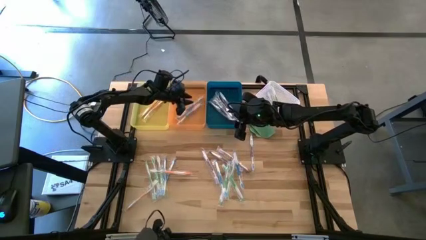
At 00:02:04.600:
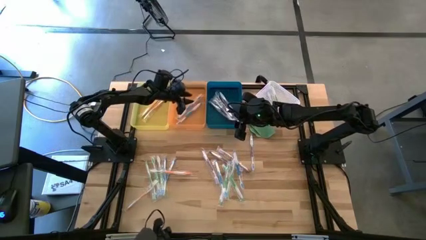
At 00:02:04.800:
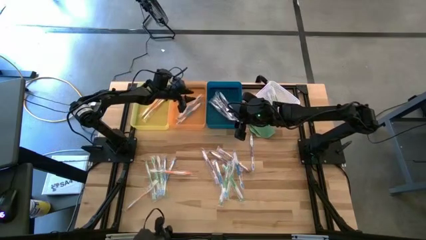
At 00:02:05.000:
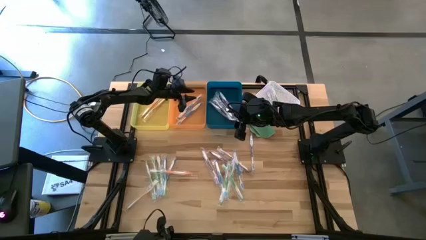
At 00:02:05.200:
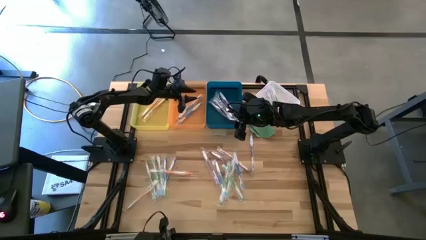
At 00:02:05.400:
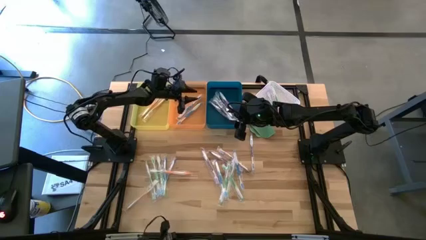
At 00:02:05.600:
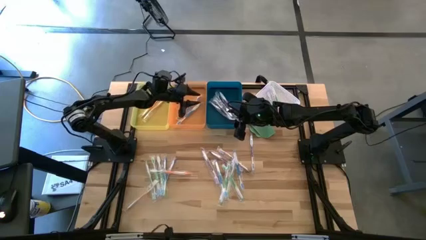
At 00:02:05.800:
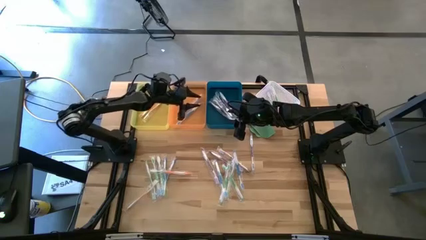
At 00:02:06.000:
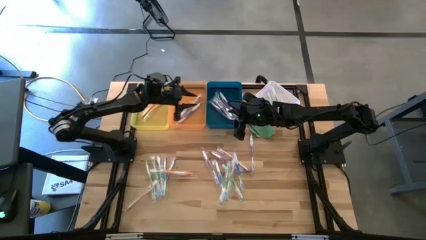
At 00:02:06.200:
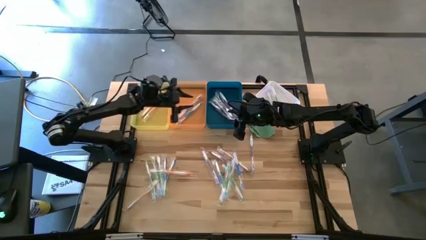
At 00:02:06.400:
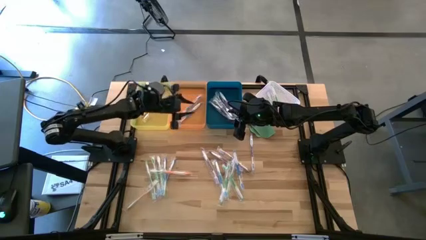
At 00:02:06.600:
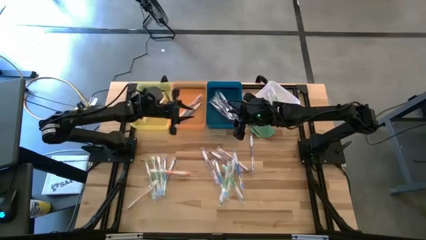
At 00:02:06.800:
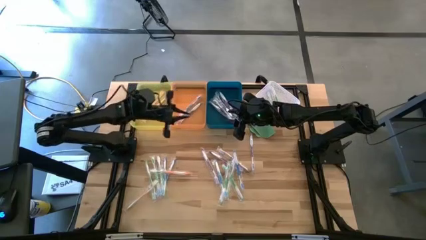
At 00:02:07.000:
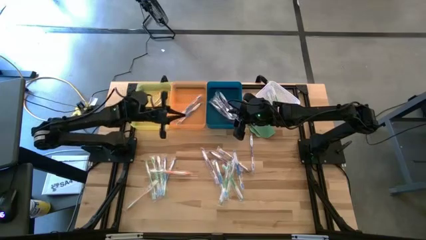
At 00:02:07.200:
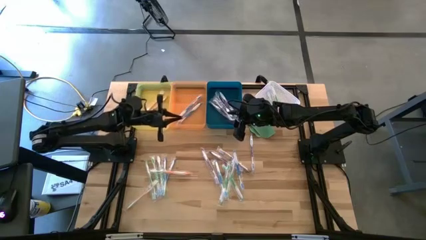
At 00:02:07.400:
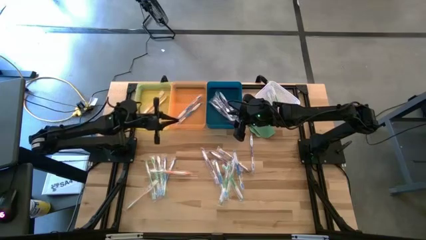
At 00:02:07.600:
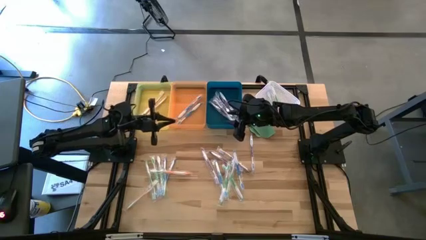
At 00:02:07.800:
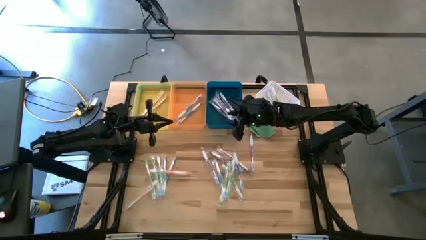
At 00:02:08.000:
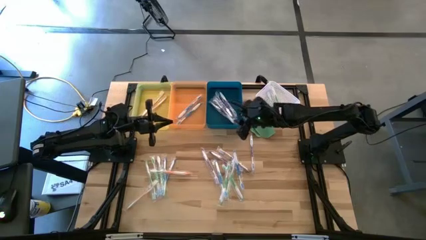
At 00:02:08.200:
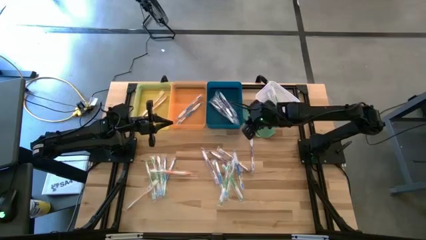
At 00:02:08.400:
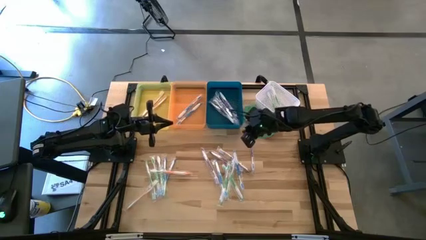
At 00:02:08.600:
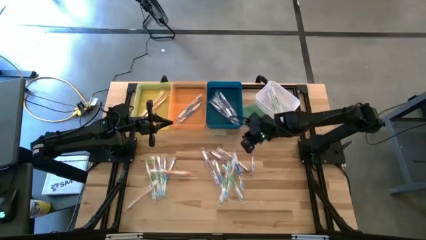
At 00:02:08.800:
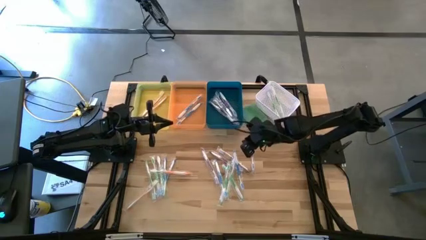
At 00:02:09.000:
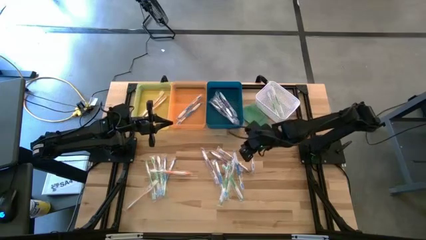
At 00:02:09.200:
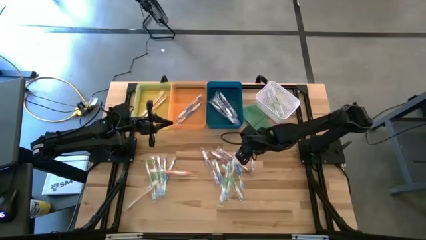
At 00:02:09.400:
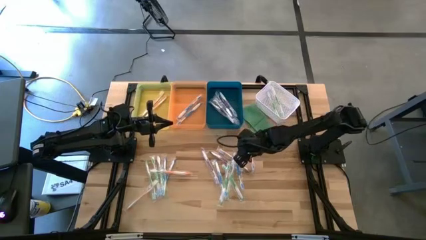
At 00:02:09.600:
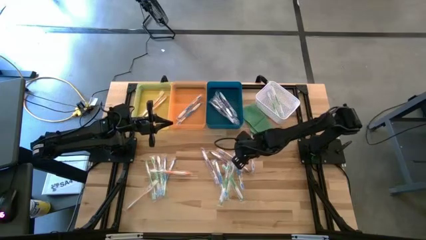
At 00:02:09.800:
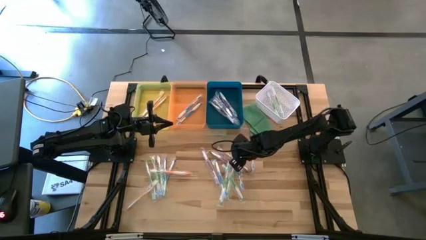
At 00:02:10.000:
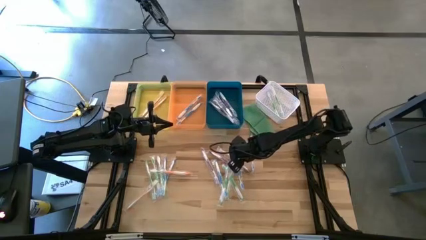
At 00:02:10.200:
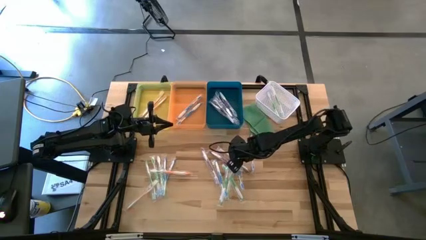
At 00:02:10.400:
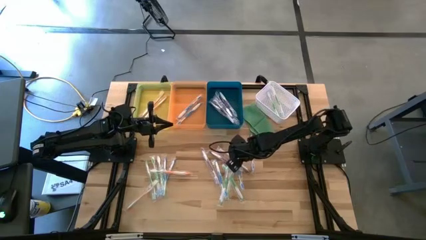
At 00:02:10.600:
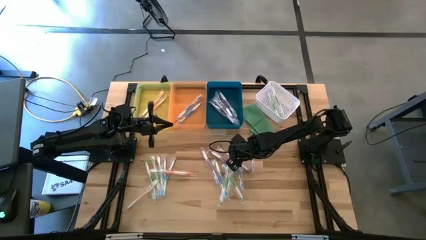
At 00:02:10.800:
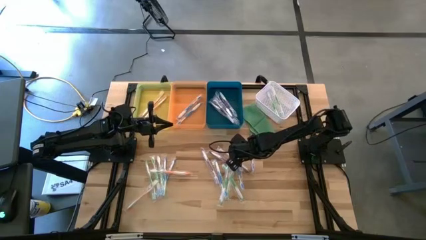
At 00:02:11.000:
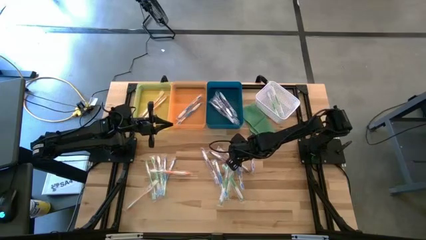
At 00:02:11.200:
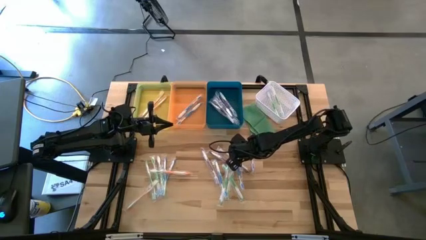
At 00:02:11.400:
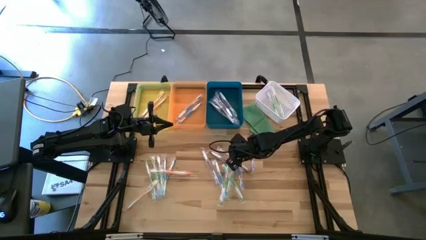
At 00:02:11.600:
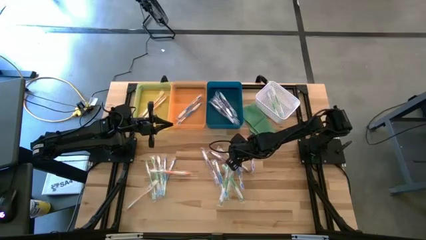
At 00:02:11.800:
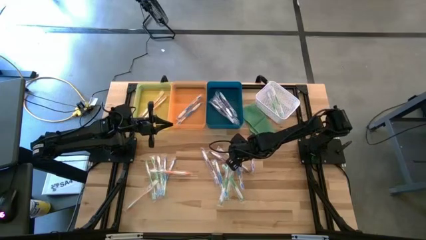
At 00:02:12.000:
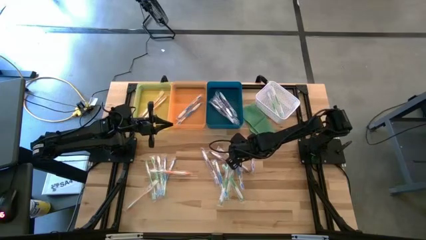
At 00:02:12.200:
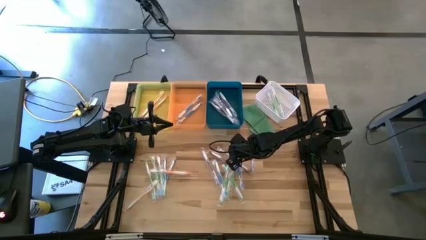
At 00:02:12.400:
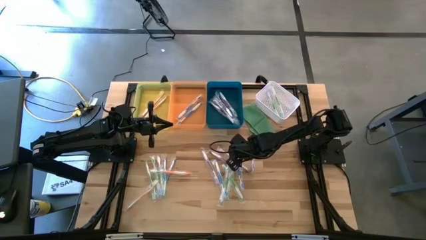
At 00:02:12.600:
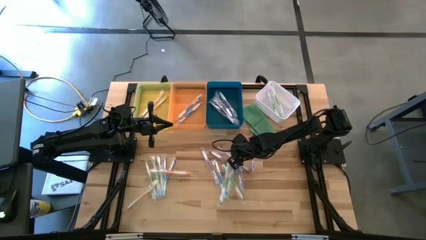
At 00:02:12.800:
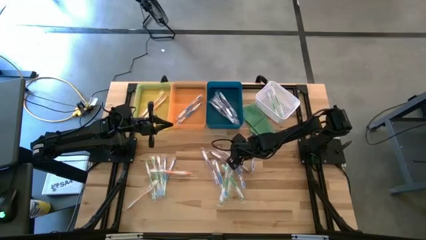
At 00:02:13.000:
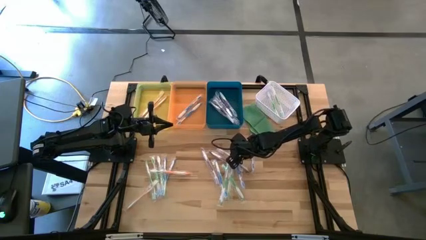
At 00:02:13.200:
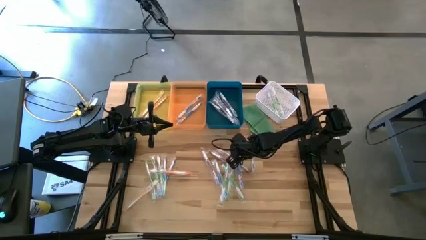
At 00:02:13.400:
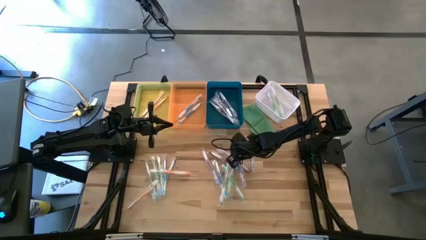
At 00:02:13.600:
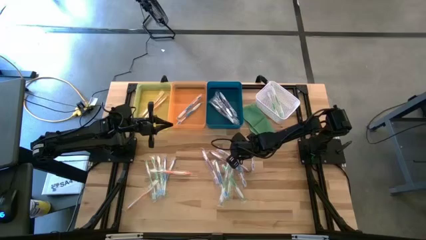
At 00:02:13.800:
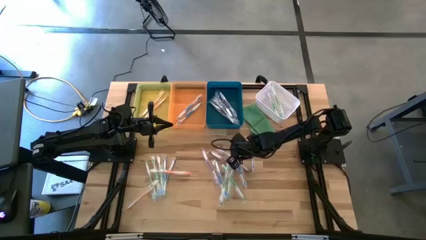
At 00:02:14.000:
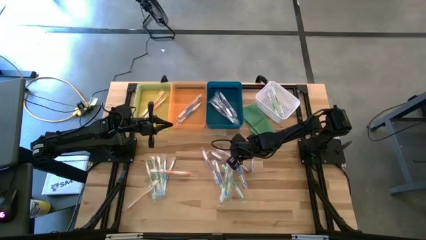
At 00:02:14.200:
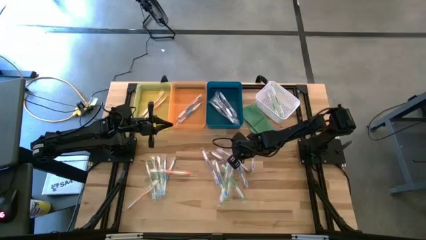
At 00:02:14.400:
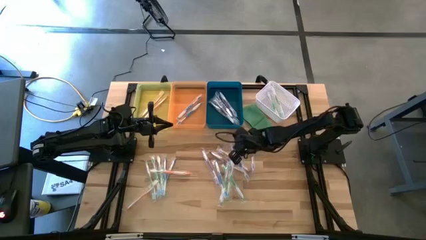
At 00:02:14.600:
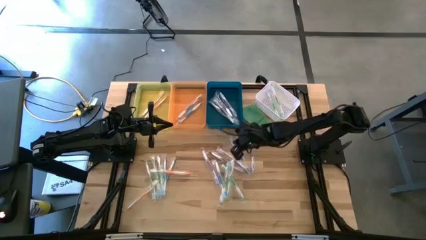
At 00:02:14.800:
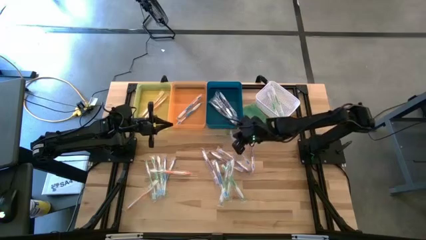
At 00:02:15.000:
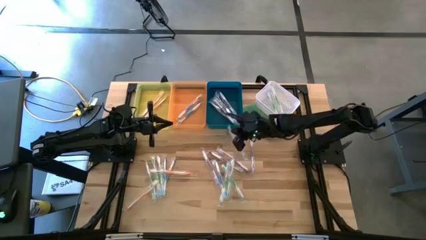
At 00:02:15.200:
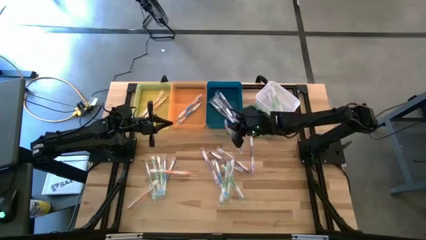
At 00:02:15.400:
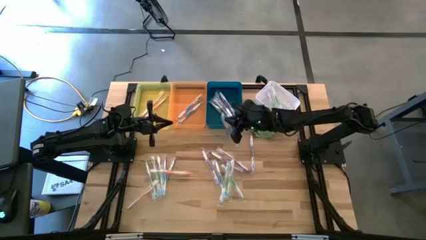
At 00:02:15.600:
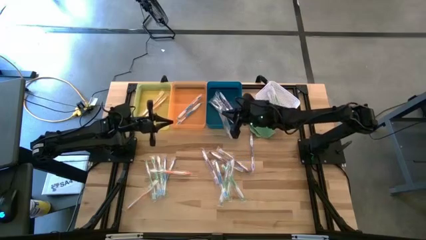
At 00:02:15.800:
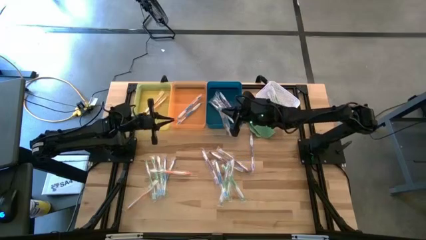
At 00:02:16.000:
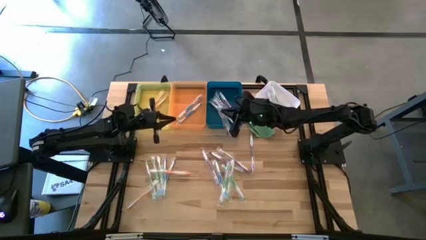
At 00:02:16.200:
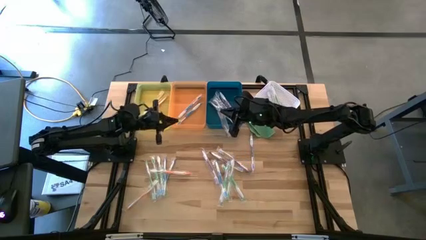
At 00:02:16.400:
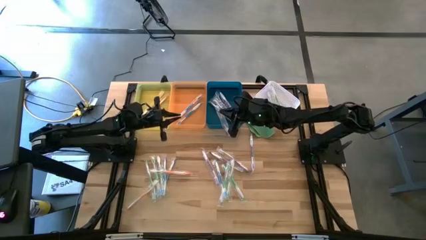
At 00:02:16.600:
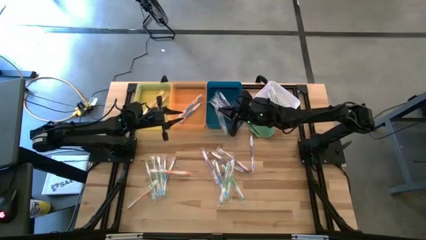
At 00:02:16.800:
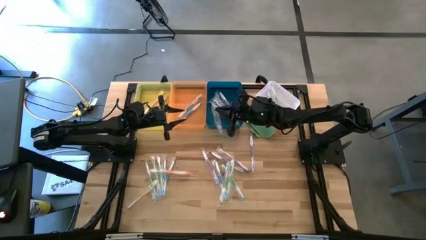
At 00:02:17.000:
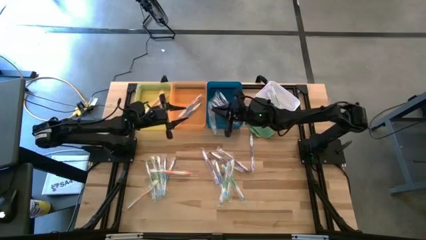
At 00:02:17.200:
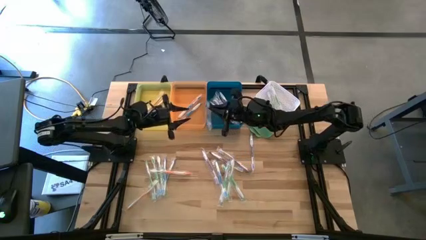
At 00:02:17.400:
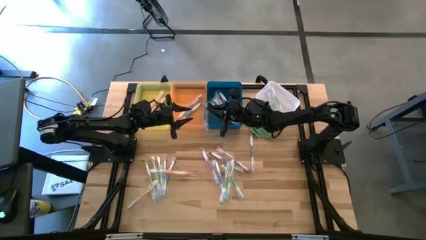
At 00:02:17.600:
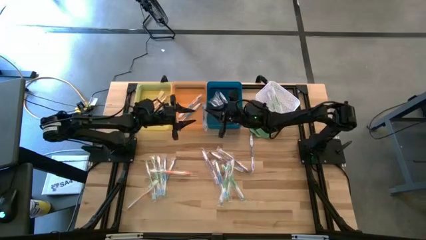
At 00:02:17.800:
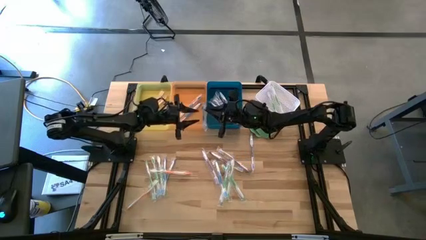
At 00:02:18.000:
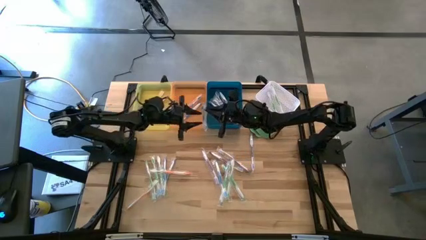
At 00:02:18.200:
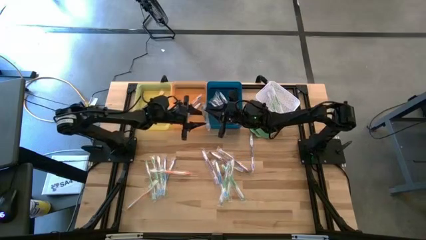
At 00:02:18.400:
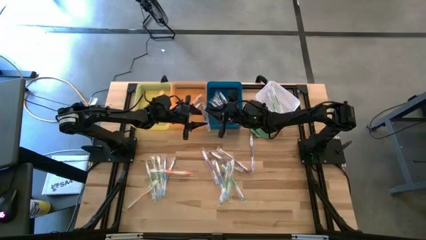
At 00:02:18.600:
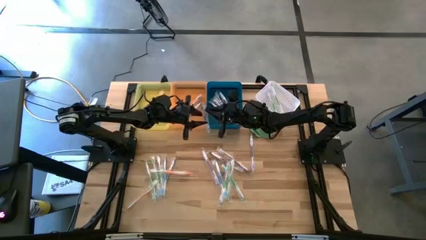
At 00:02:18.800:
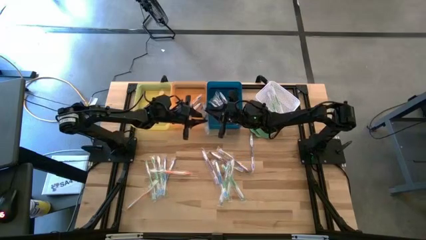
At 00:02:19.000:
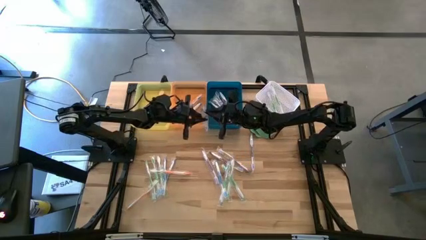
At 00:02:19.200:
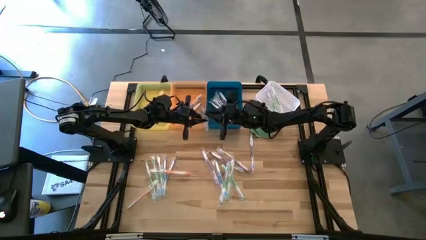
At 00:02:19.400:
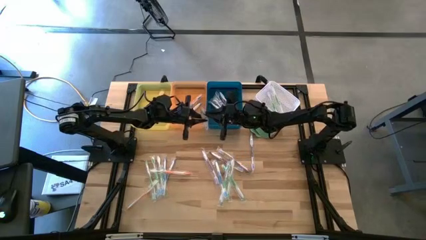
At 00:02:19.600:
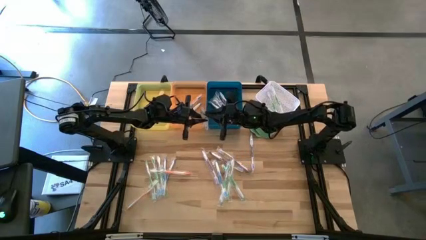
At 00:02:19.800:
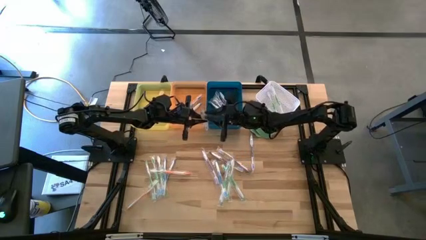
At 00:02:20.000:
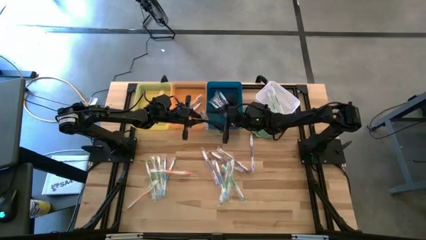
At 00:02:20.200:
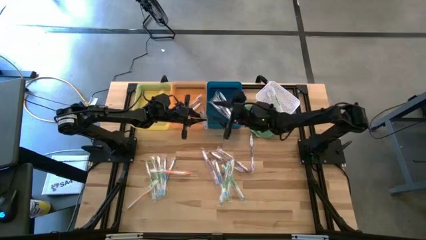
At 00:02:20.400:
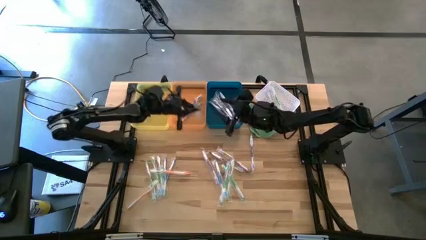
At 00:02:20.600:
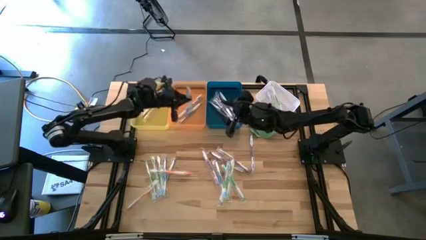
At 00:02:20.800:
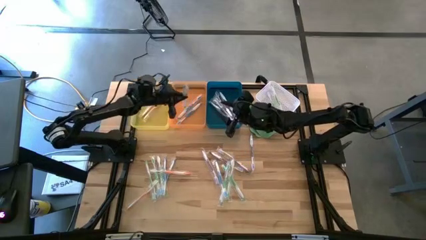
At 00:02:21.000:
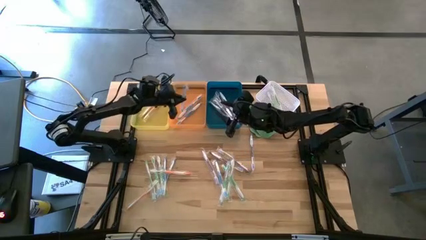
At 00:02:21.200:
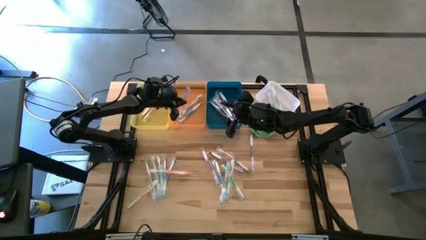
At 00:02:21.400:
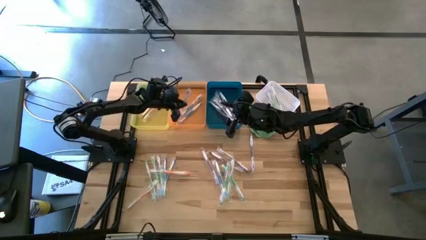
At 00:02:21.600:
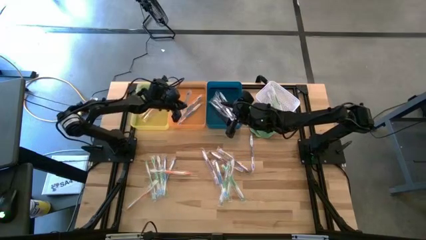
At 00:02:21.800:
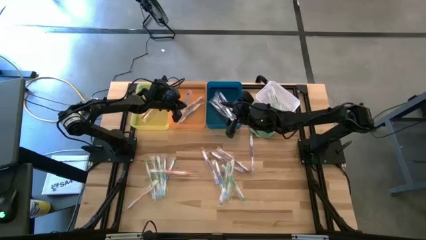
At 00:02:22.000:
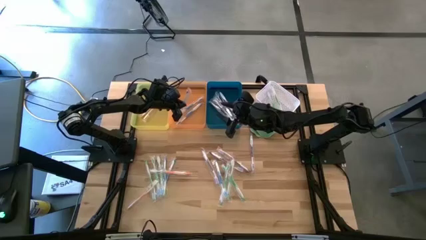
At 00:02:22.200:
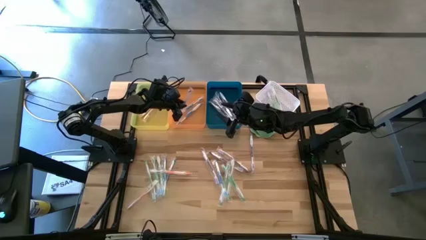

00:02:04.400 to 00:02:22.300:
Task: Pick & Place Toothbrushes
Put the blue toothbrush into the orange bin
